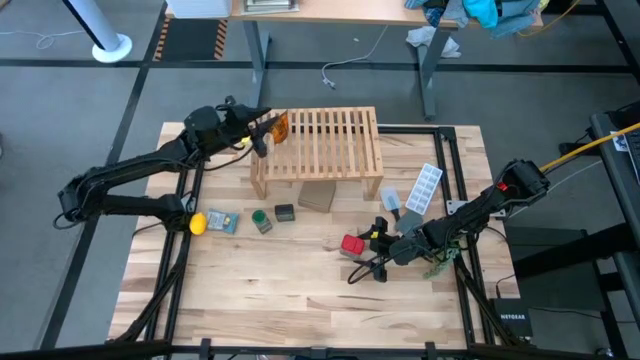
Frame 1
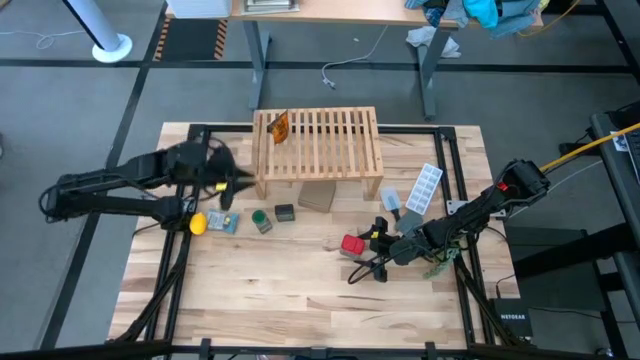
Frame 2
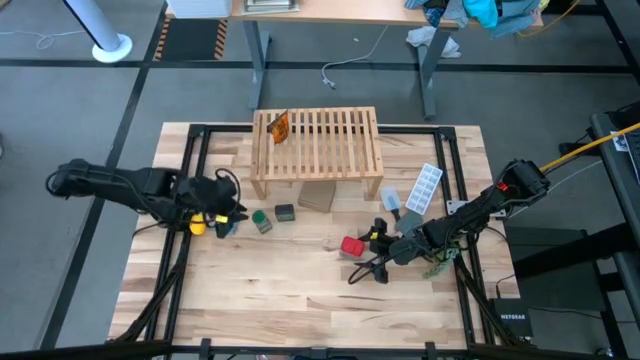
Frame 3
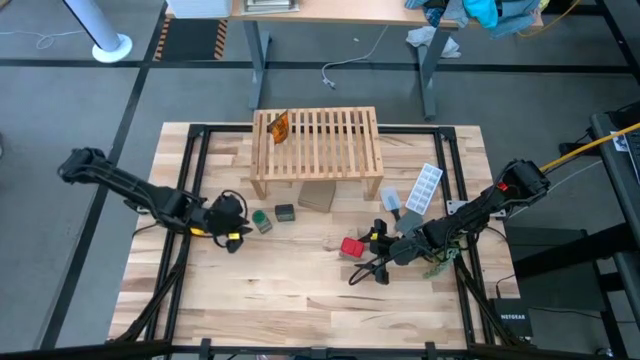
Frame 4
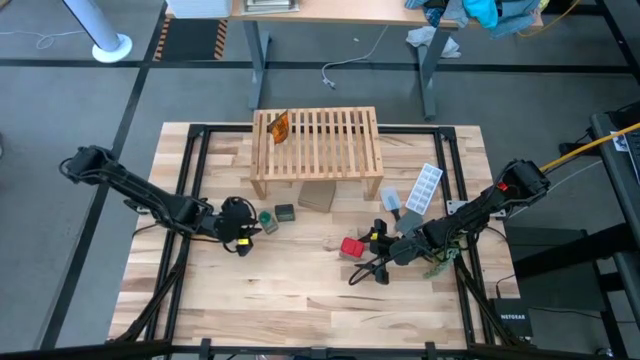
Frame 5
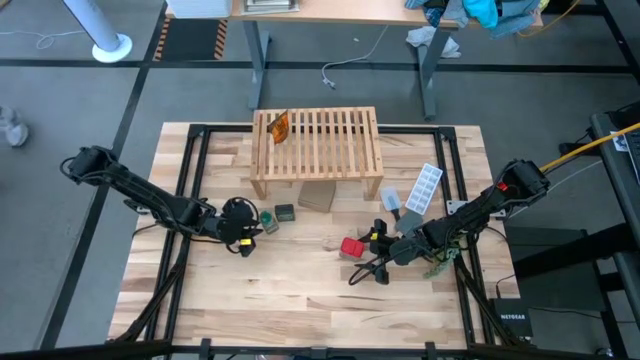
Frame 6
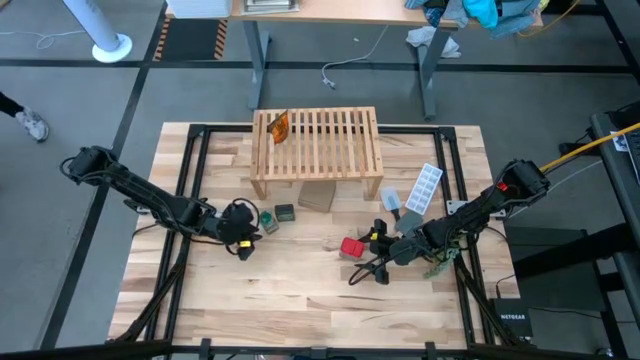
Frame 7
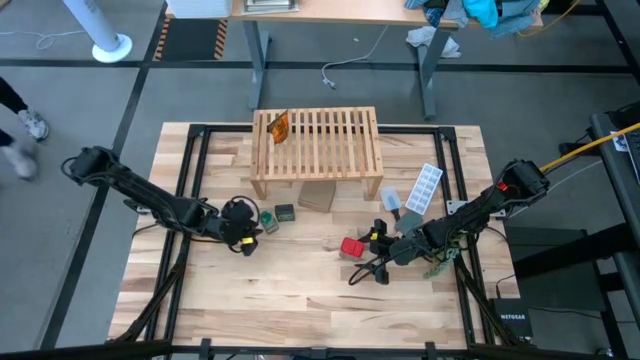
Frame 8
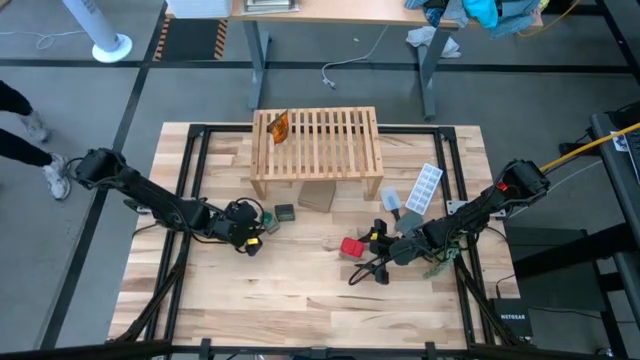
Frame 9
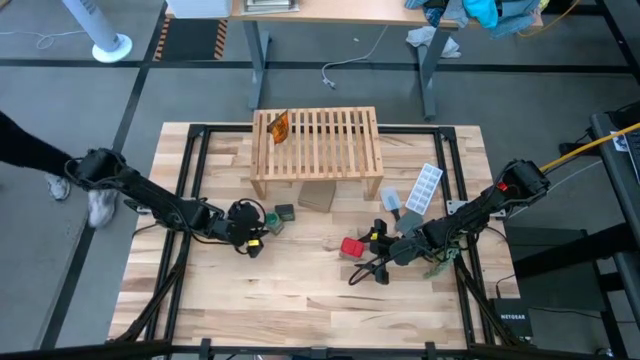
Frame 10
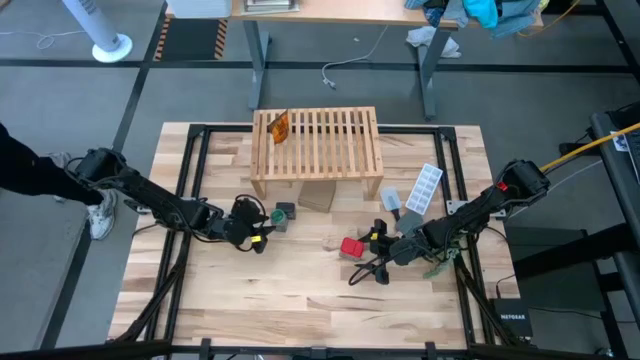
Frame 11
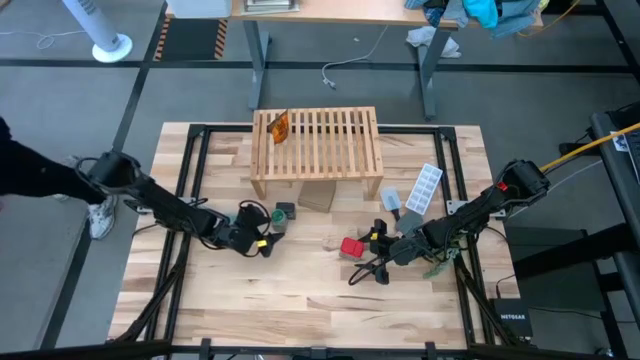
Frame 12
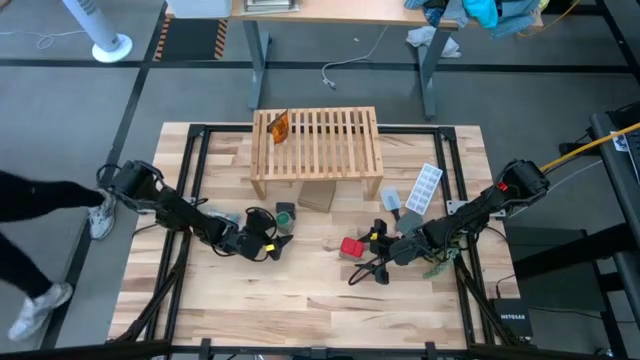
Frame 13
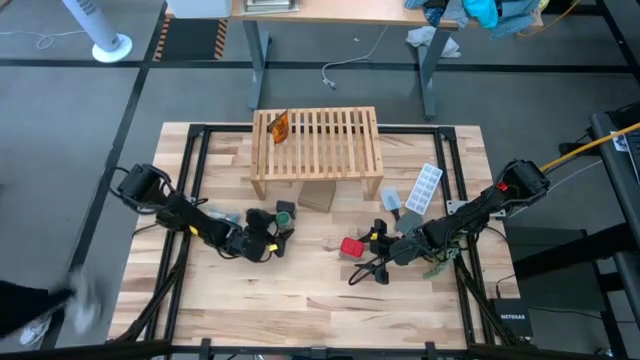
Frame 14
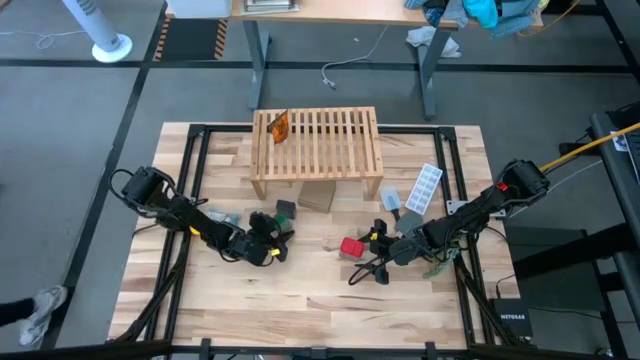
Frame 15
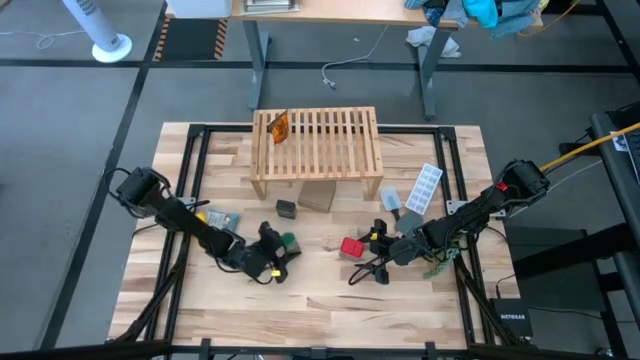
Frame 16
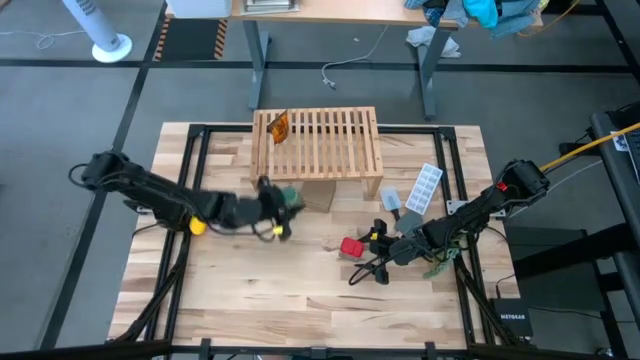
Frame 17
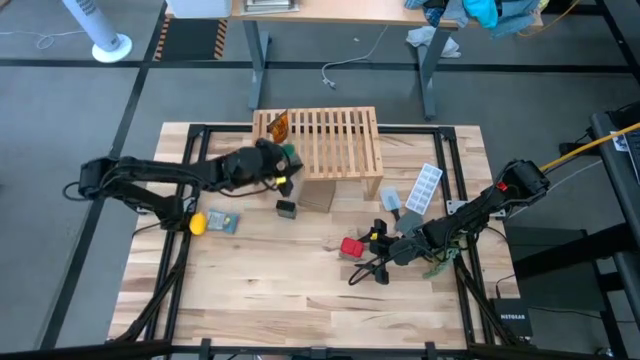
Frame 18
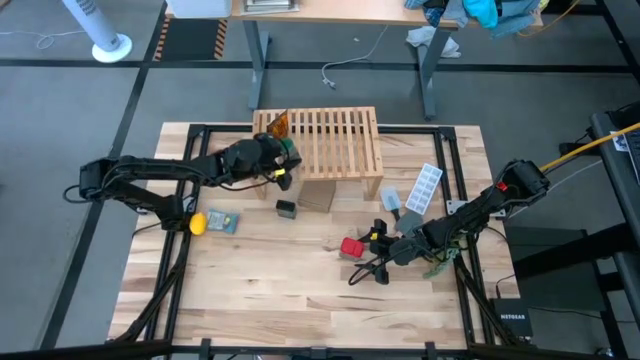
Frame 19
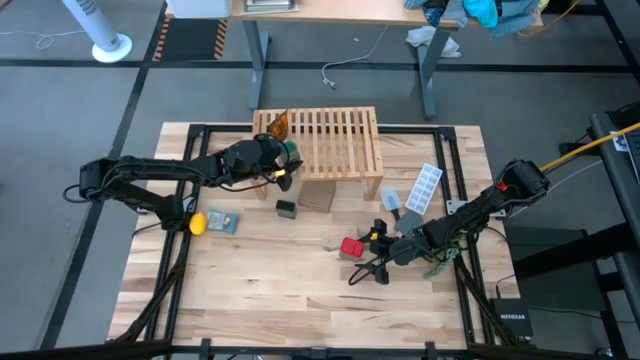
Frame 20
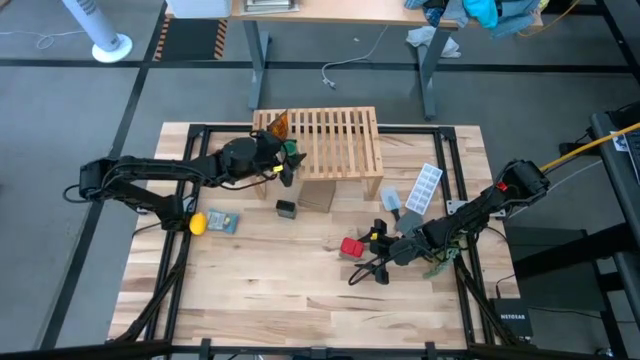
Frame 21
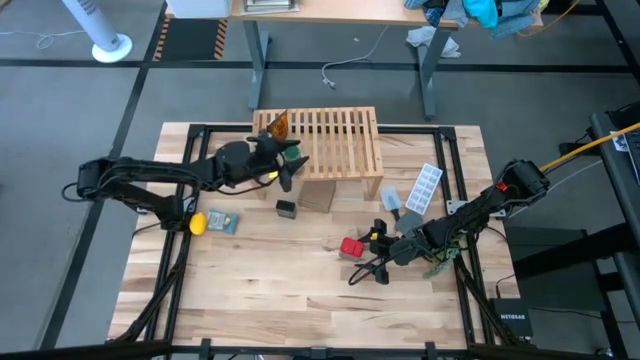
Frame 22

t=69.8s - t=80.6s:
Task: Shelf spices
Put the green seasoning bottle on the shelf

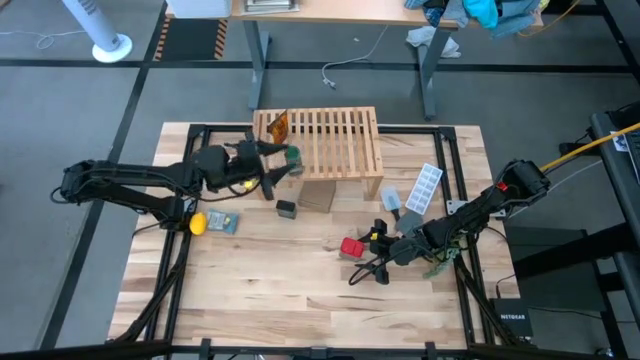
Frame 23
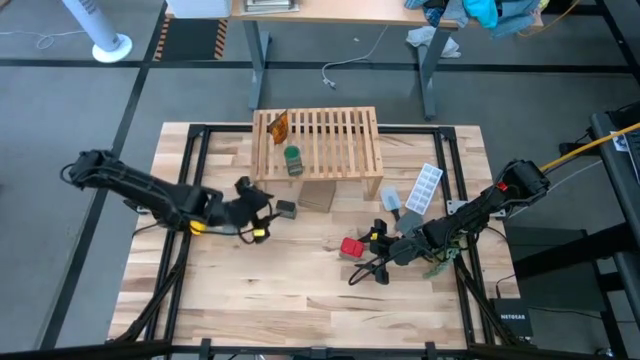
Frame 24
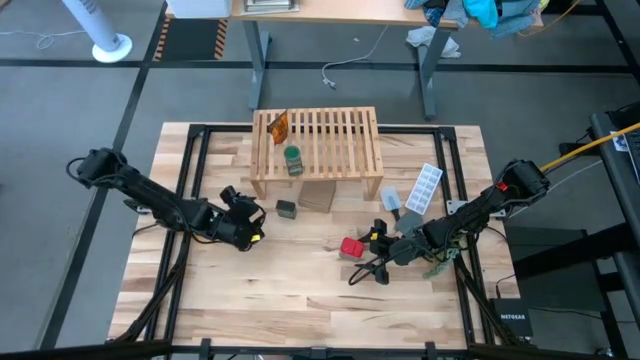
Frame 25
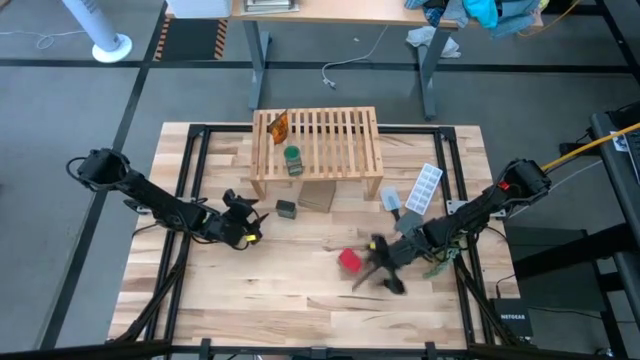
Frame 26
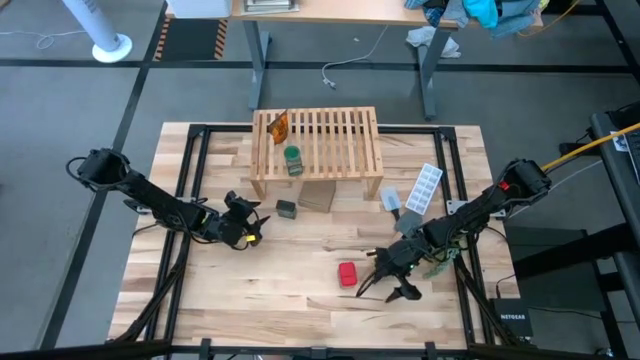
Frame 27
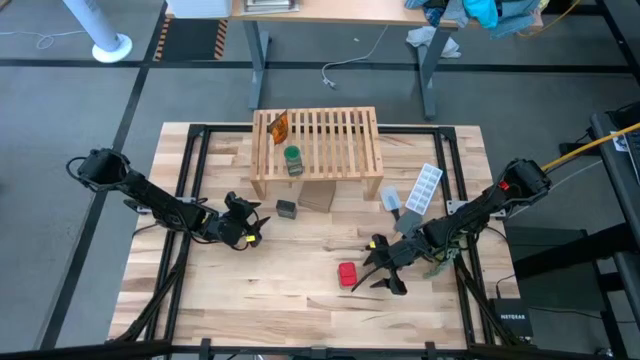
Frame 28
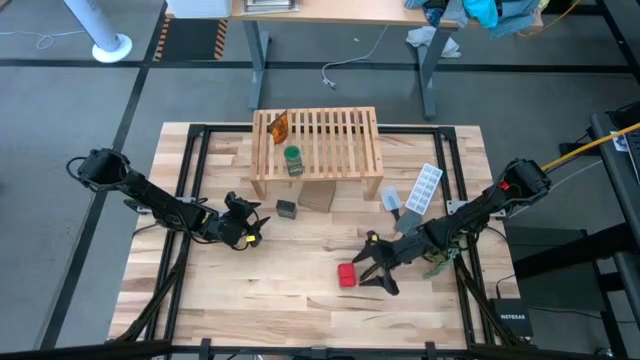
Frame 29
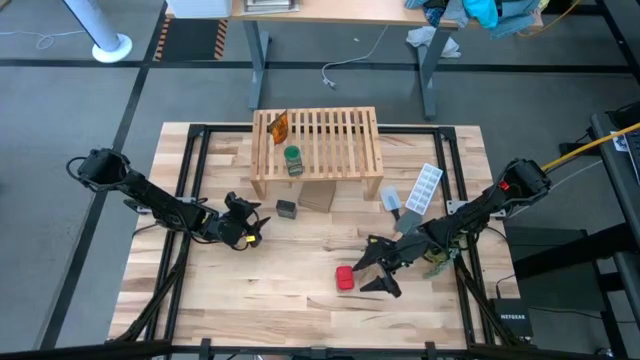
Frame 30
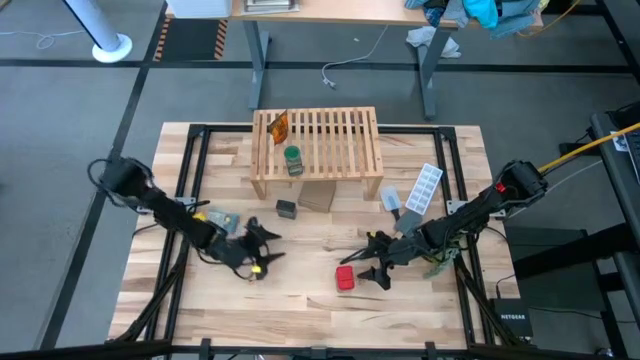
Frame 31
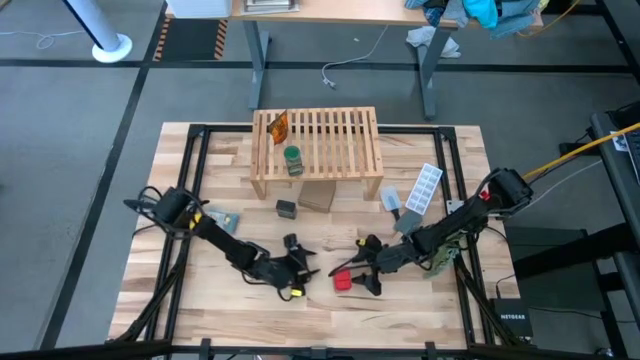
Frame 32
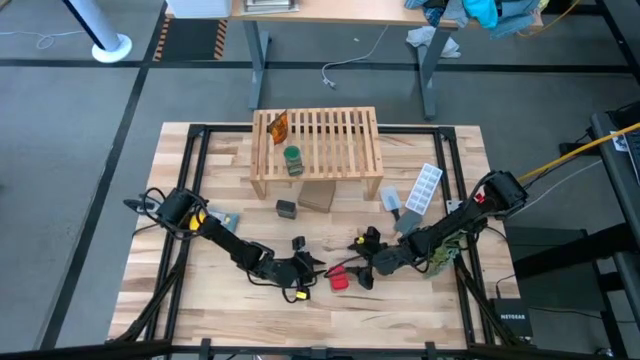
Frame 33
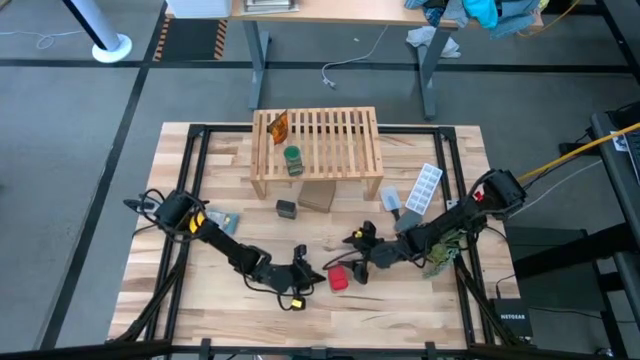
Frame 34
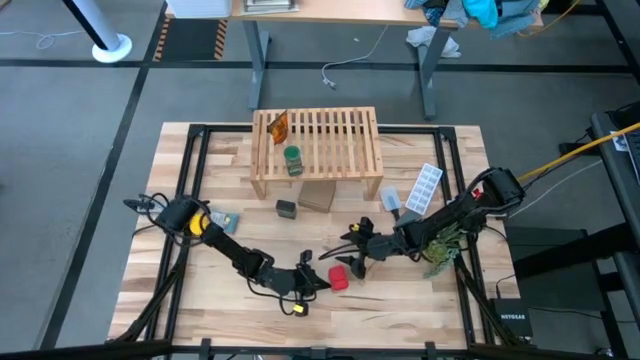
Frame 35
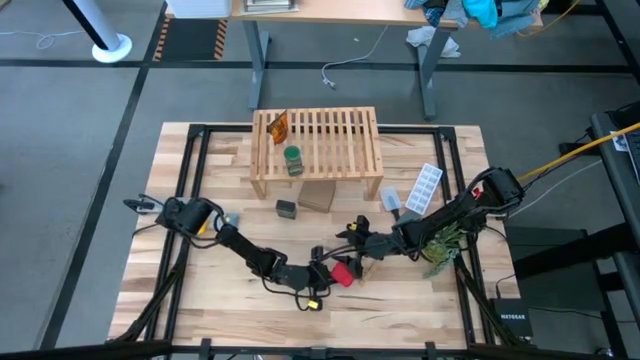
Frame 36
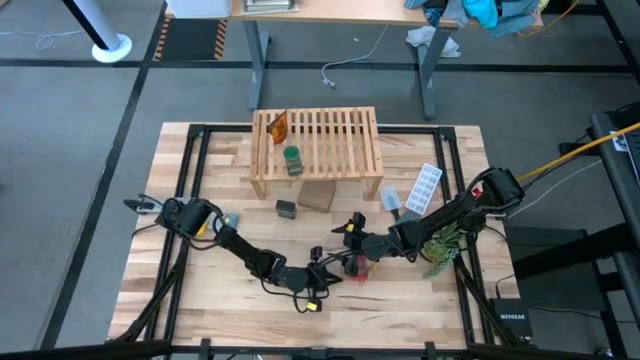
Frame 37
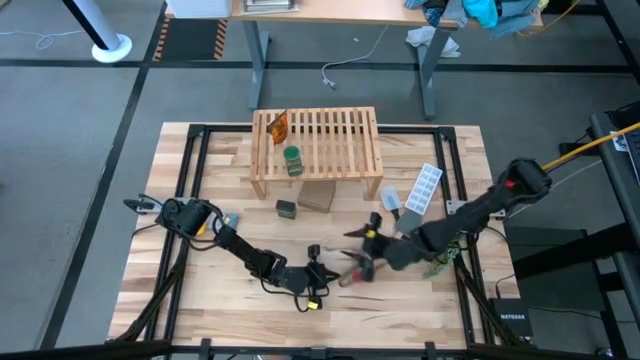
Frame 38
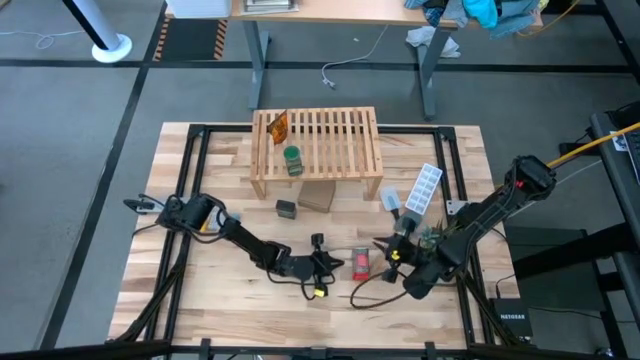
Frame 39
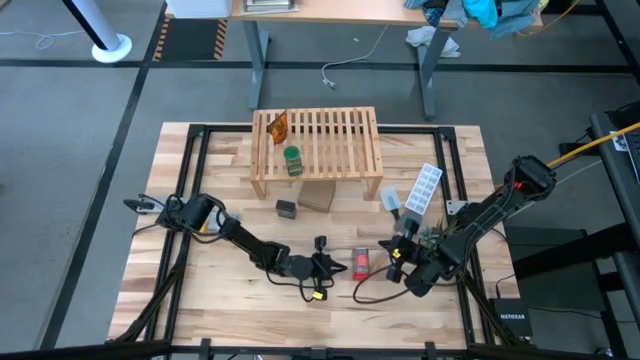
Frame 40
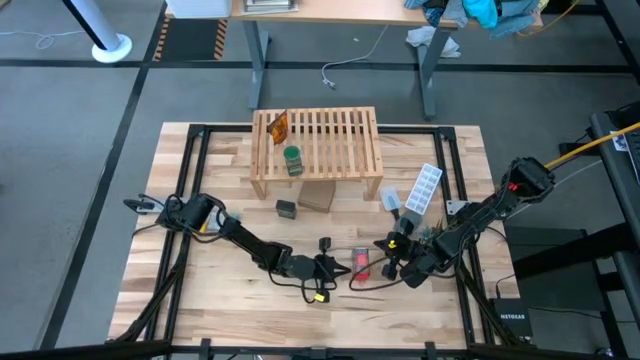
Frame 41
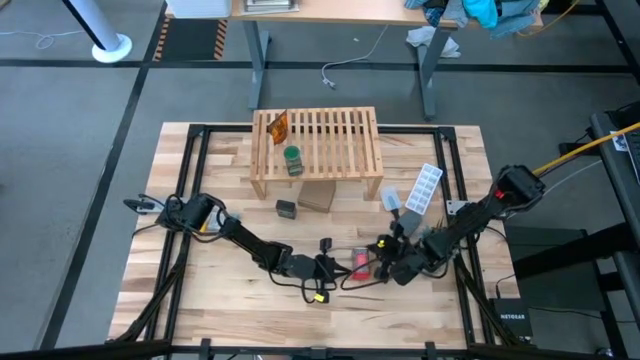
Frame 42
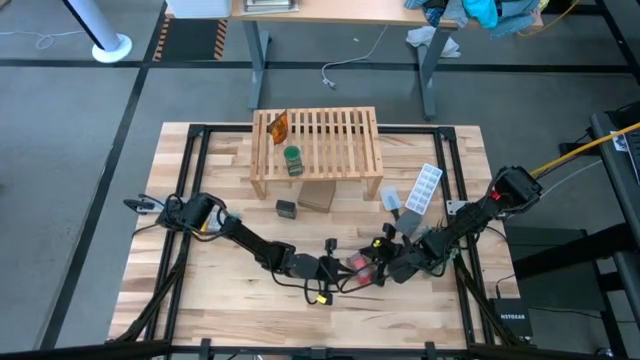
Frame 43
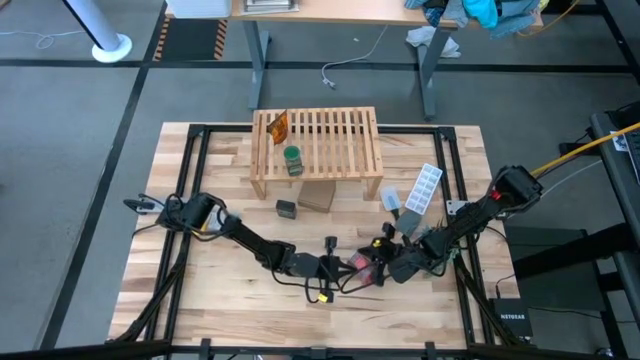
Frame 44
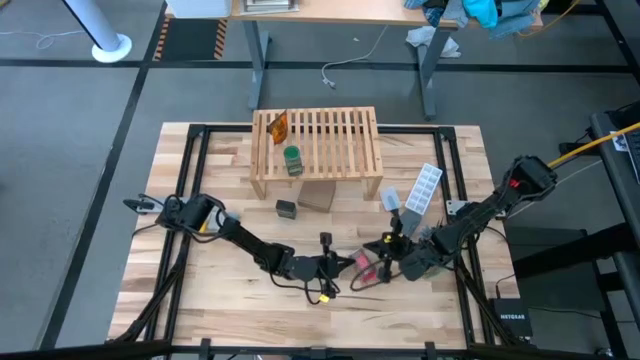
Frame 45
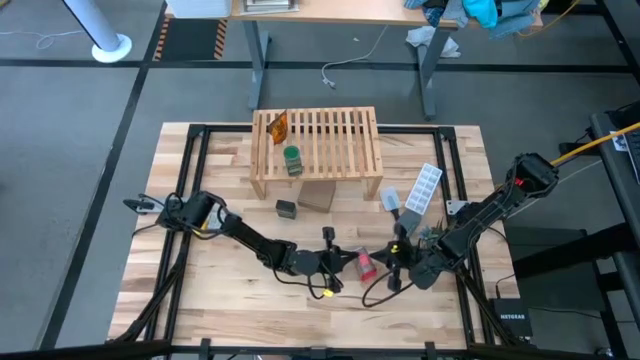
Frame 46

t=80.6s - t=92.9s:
Put the red seasoning can on the shelf
